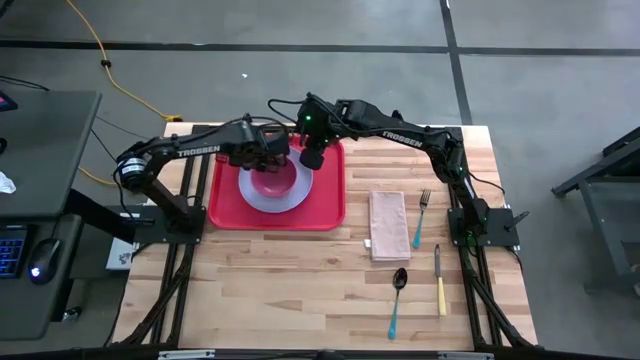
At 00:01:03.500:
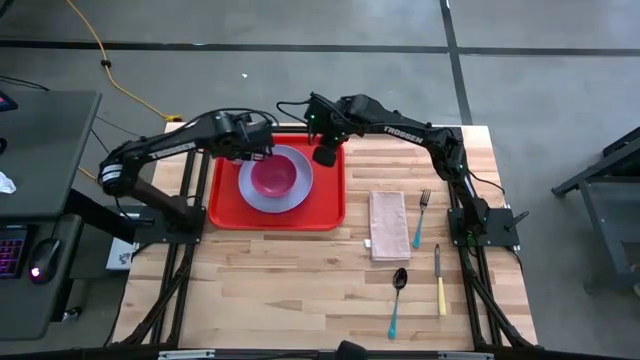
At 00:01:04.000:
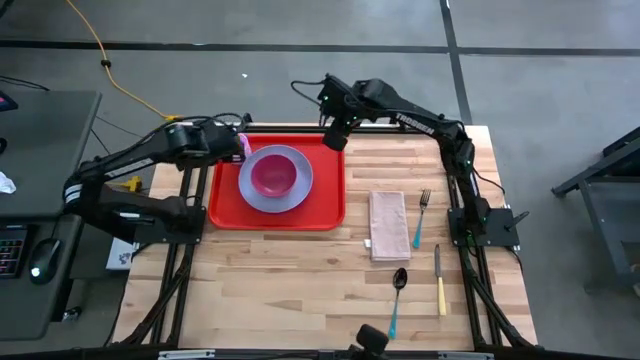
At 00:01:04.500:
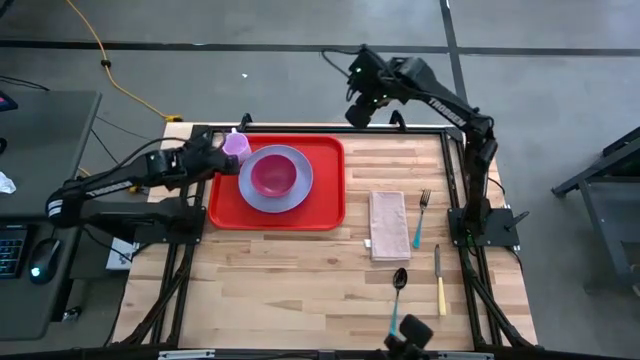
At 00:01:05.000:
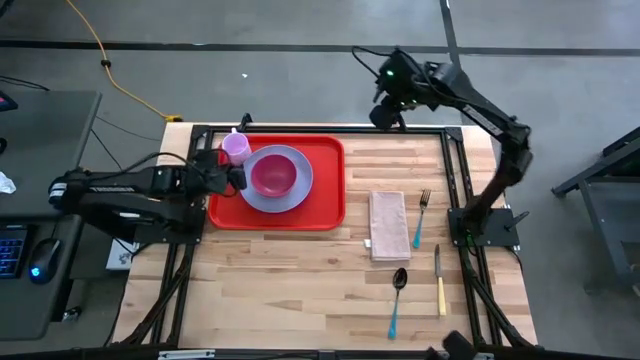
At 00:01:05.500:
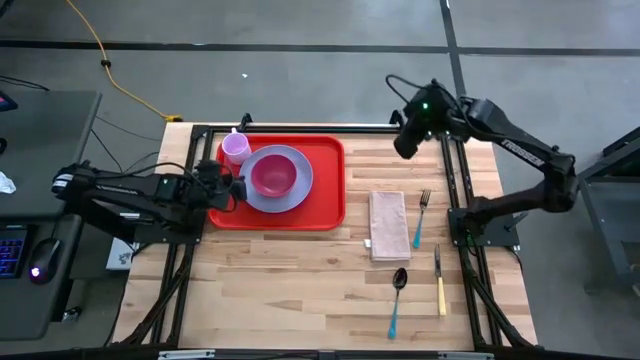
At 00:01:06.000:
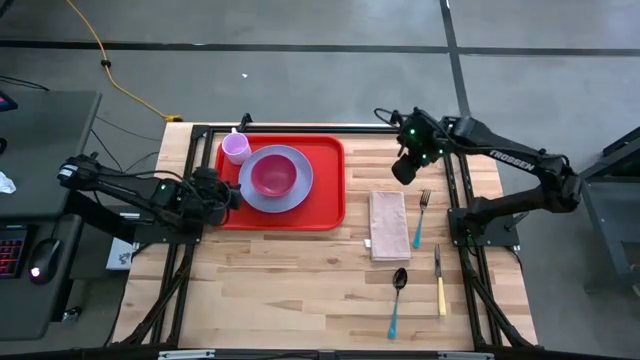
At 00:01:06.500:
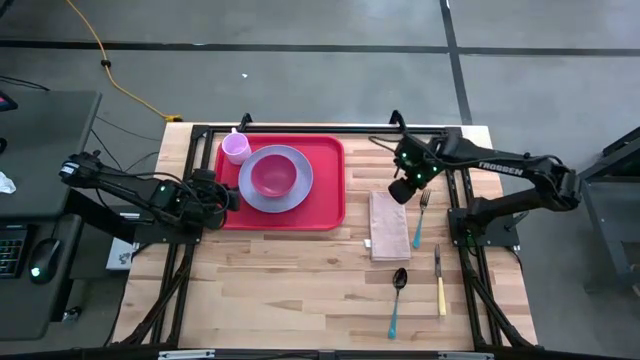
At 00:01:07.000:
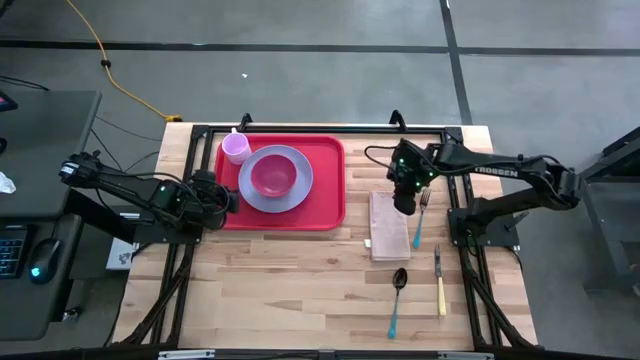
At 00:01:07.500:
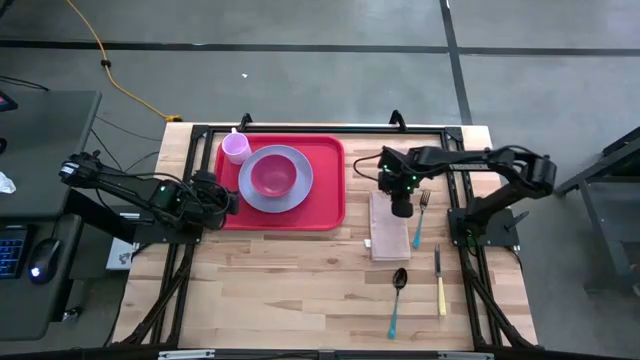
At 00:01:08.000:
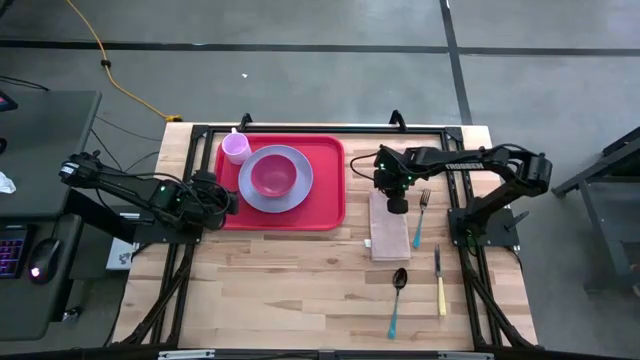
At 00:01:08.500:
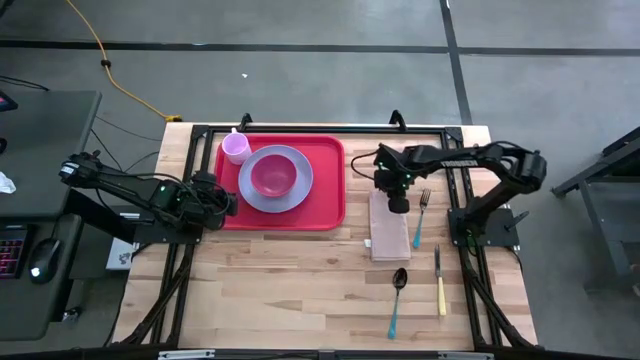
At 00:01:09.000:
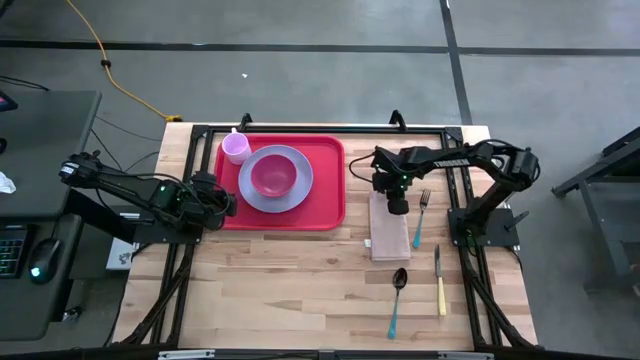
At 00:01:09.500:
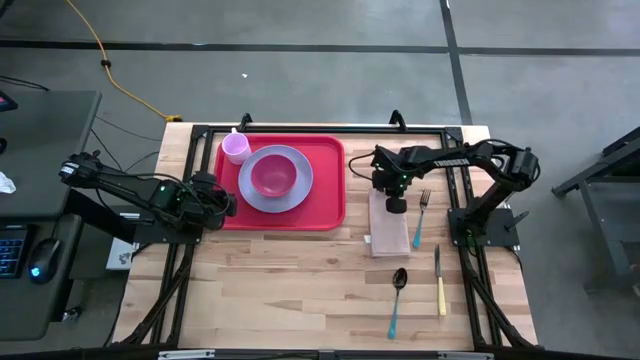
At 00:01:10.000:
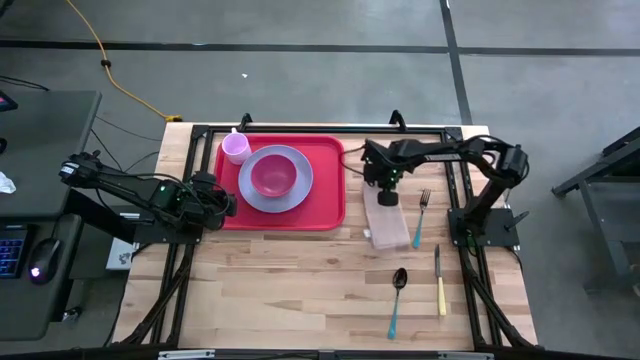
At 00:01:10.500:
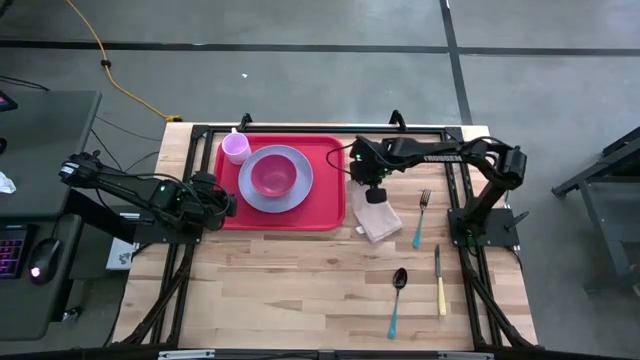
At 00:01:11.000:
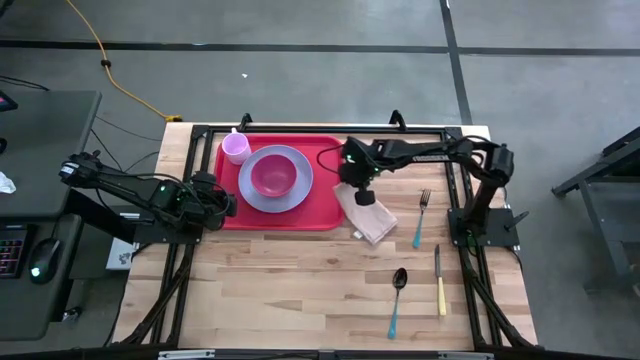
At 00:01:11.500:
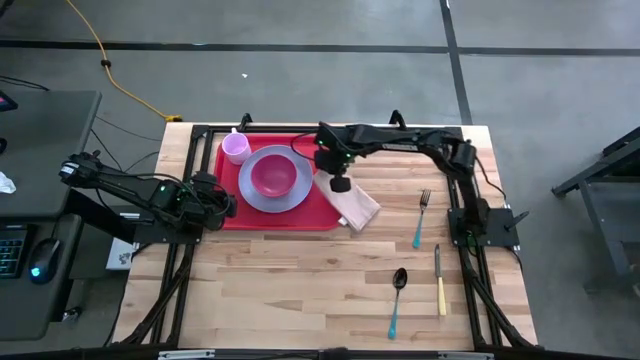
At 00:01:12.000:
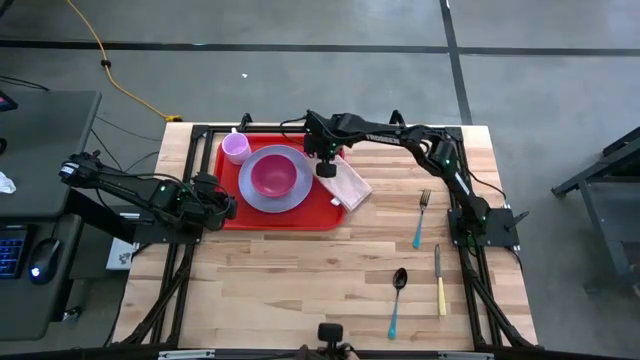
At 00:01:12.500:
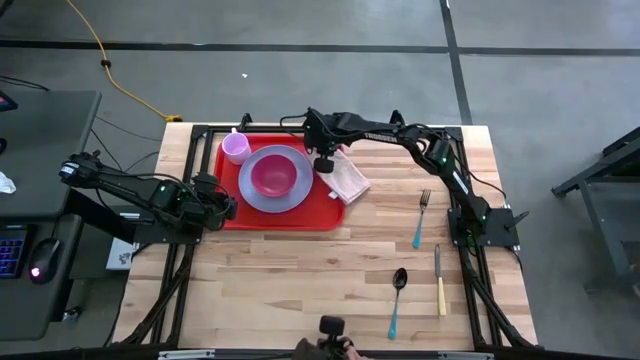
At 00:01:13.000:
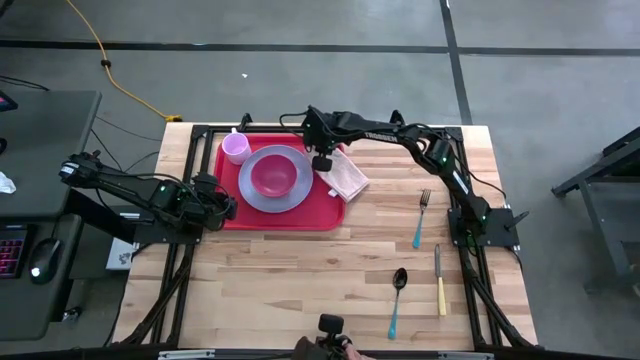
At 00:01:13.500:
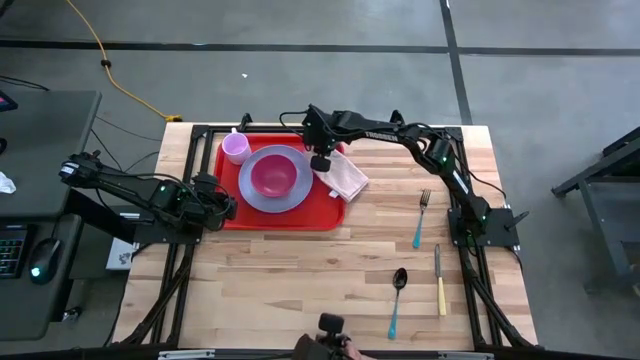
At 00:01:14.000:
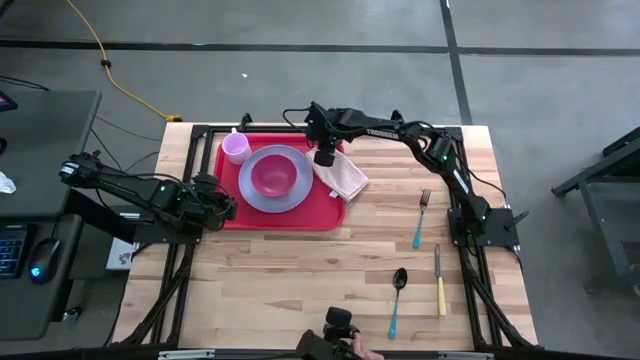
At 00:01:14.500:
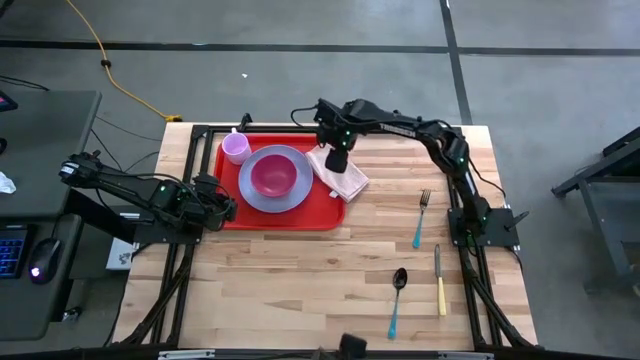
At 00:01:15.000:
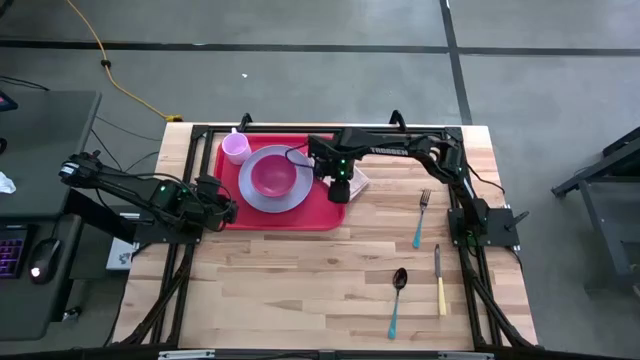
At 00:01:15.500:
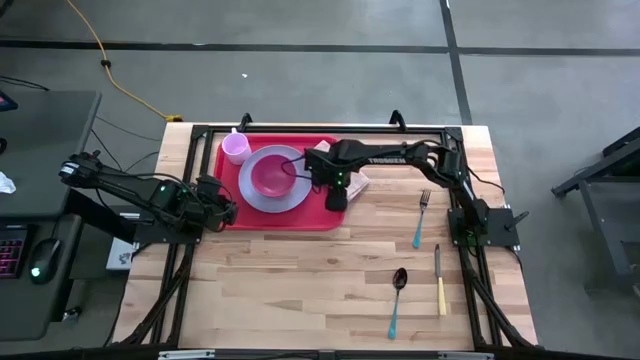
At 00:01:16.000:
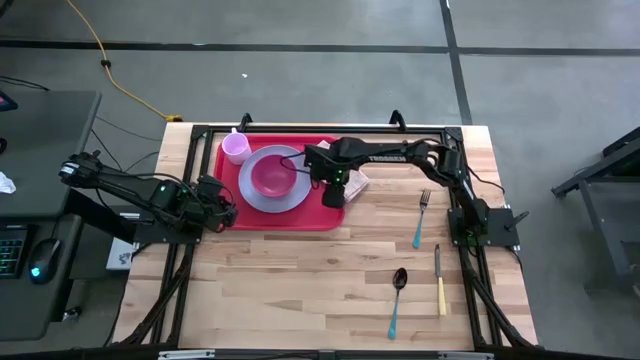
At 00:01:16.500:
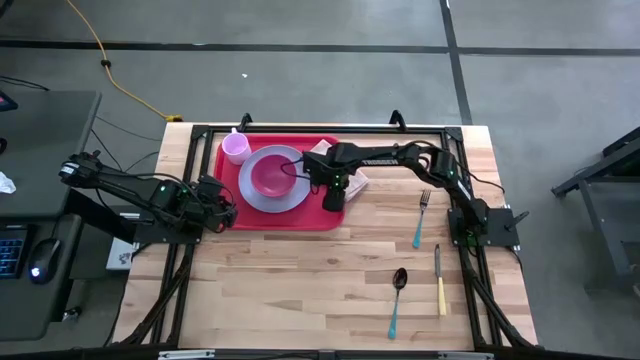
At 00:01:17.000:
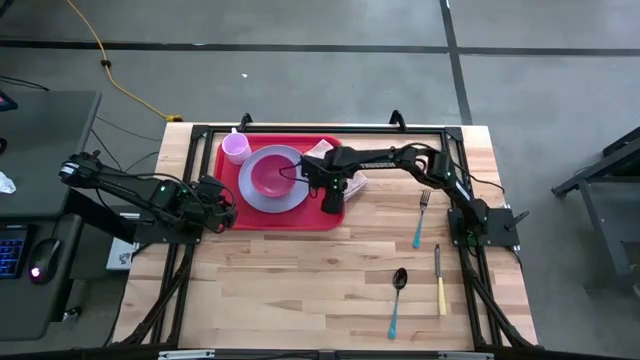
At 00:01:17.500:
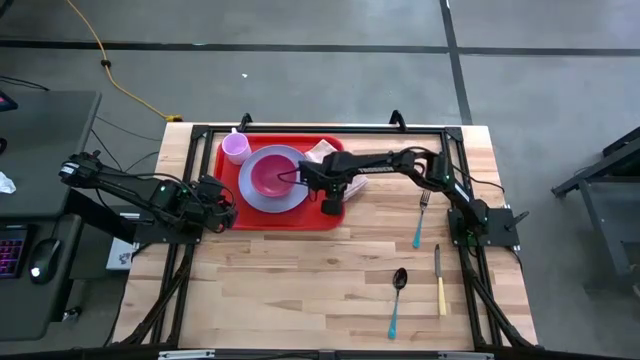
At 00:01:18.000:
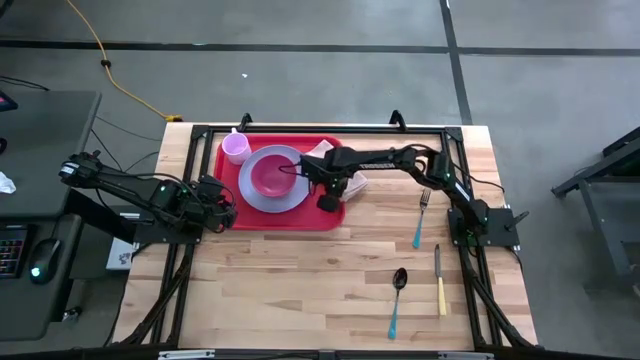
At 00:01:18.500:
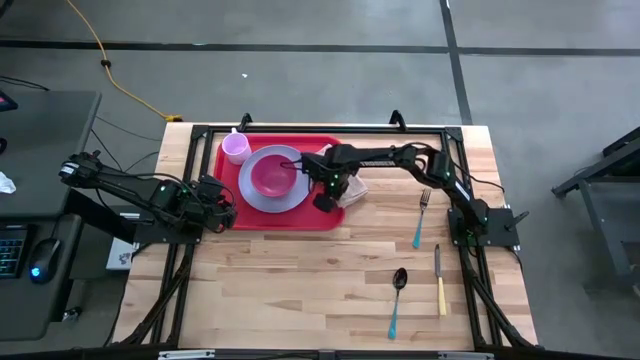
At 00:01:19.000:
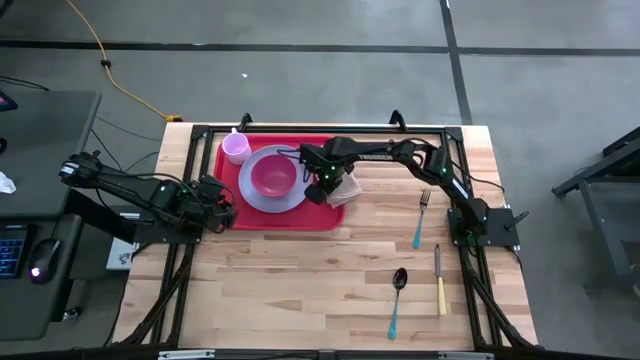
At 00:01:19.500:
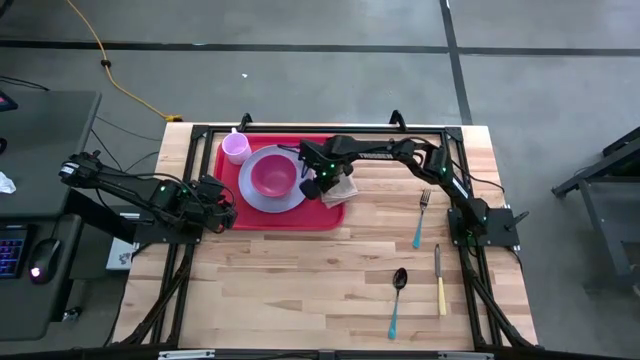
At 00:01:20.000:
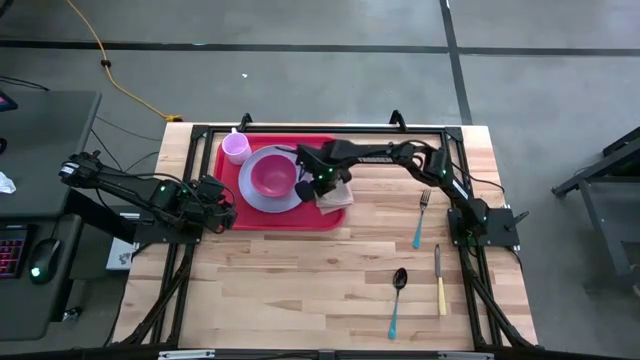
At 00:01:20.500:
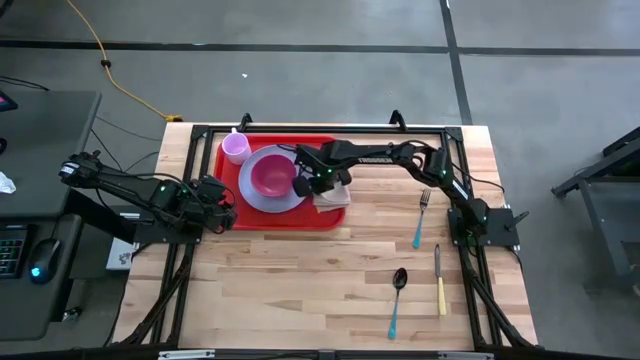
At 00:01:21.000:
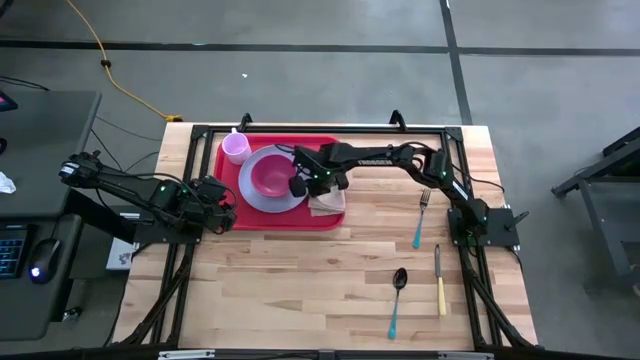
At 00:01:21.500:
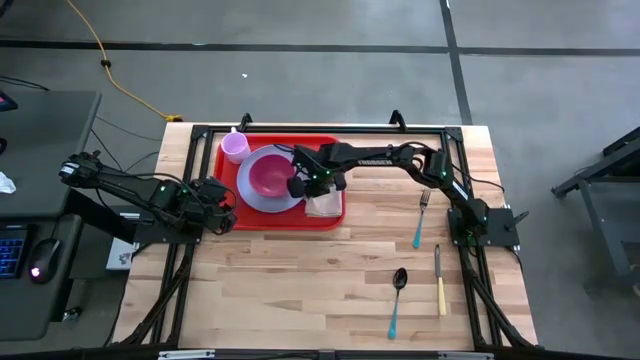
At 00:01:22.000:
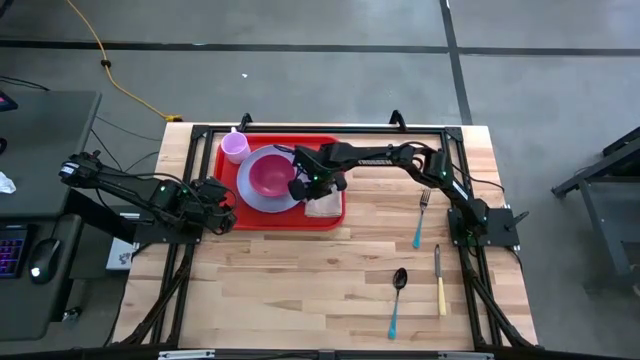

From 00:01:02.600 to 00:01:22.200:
Task: Set up tray
Put the brown napkin on the orange tray to the right of the light purple plate

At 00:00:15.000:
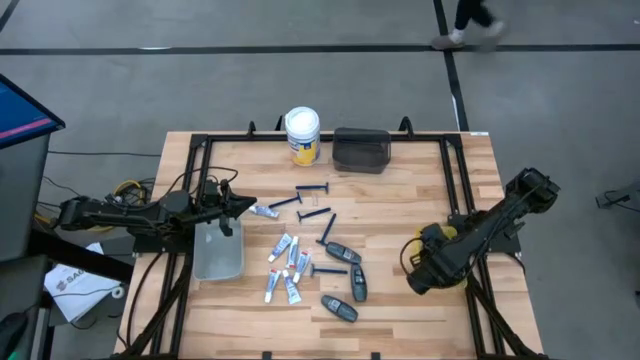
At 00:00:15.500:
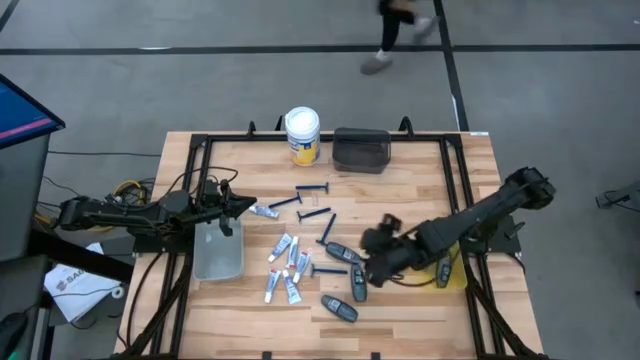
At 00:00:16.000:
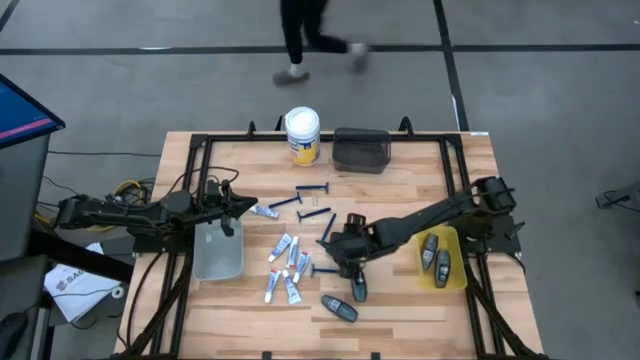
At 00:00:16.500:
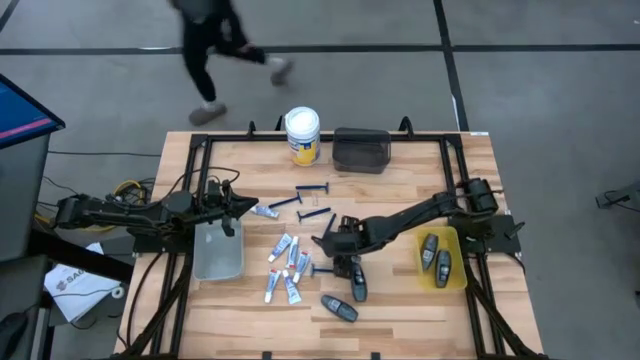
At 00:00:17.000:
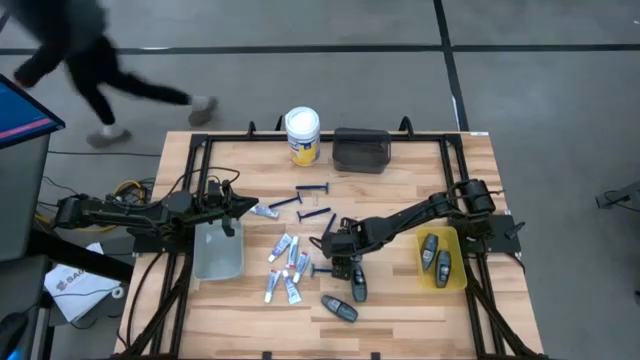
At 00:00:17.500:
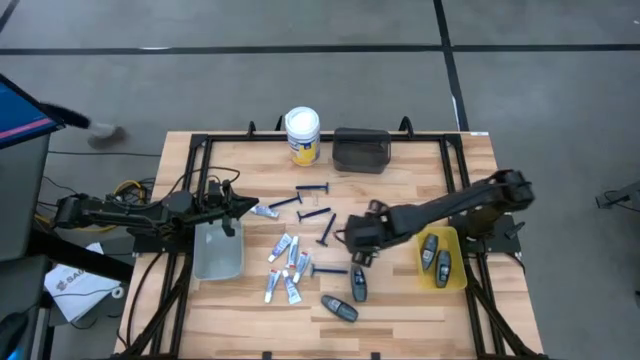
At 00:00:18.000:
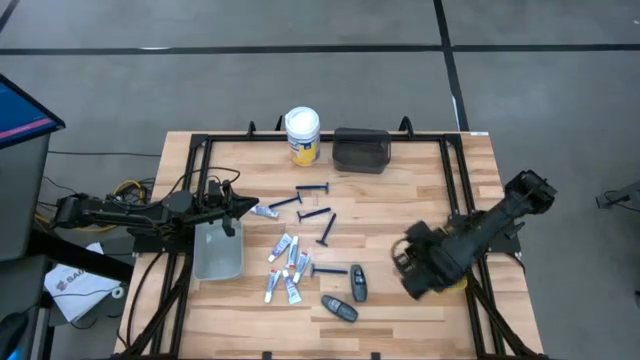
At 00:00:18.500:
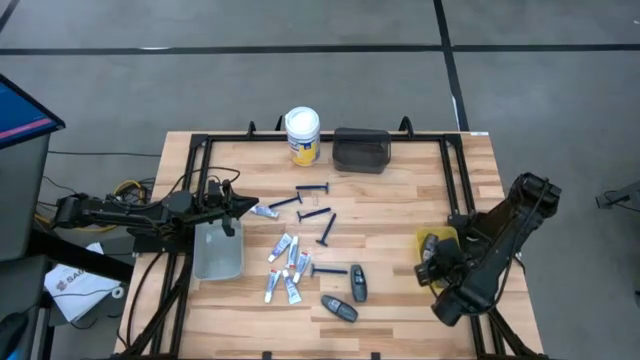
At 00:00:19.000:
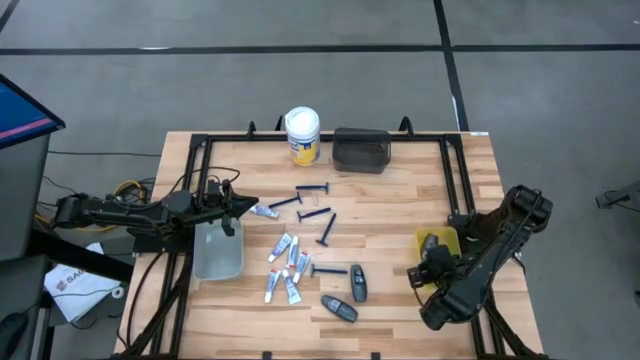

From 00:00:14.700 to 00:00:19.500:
Task: Pick & Place Travel size toiletries
Put the black deodorant into the yellow bin
